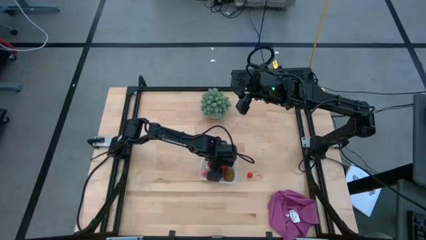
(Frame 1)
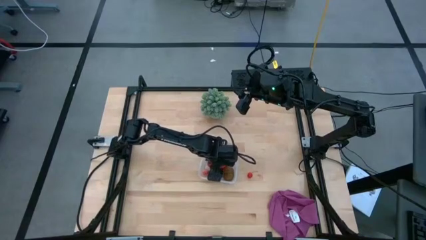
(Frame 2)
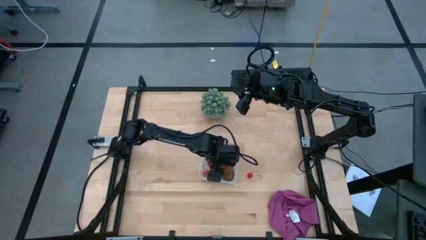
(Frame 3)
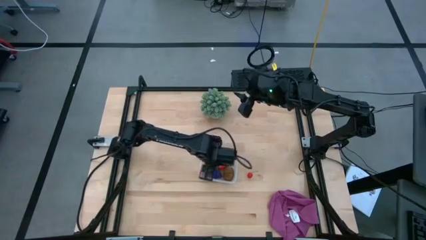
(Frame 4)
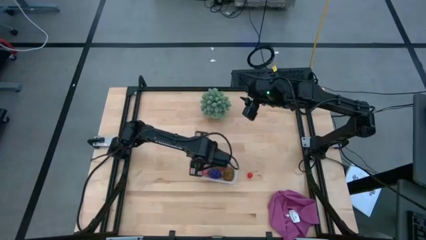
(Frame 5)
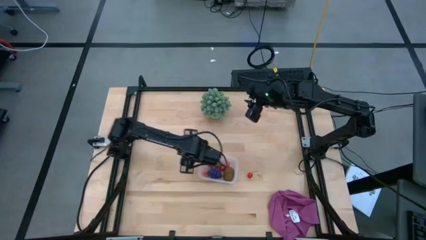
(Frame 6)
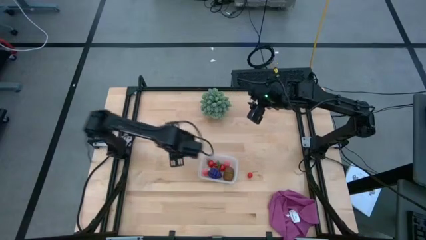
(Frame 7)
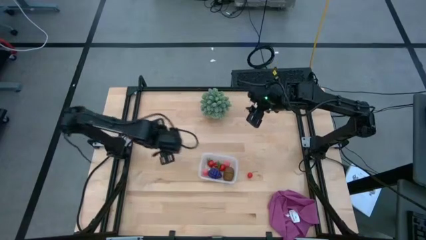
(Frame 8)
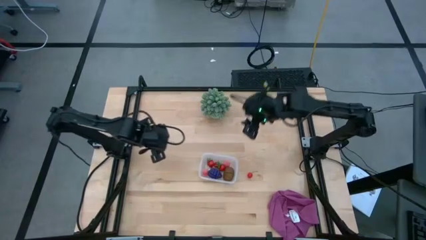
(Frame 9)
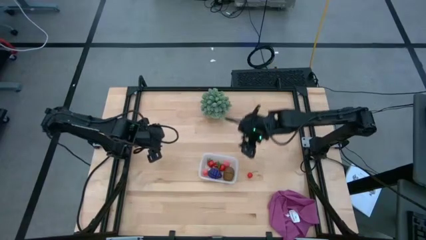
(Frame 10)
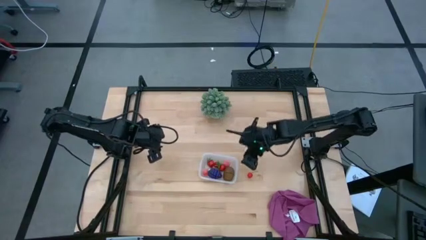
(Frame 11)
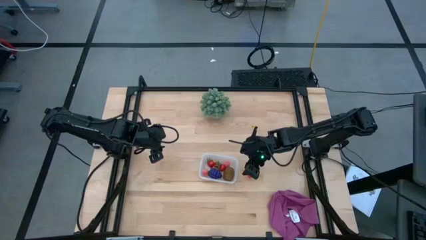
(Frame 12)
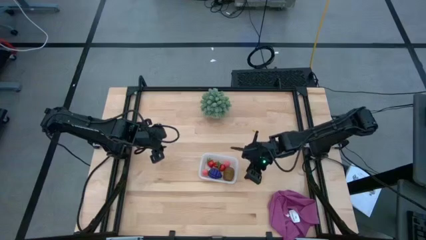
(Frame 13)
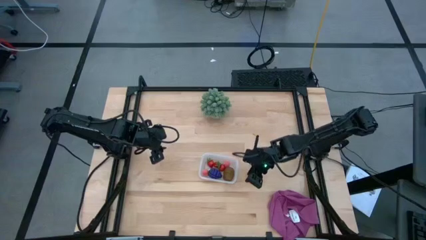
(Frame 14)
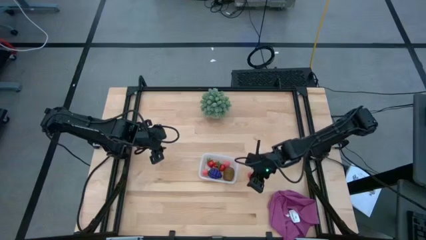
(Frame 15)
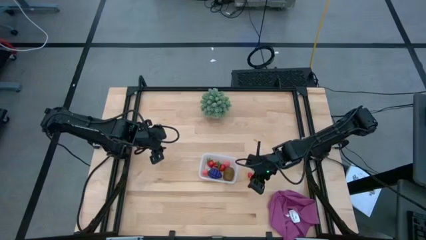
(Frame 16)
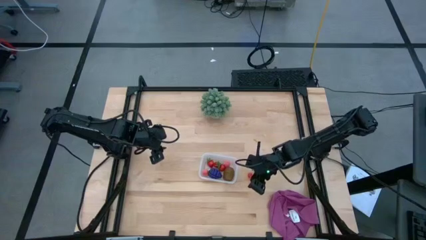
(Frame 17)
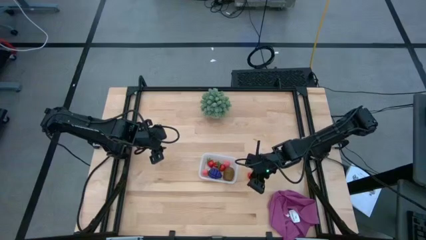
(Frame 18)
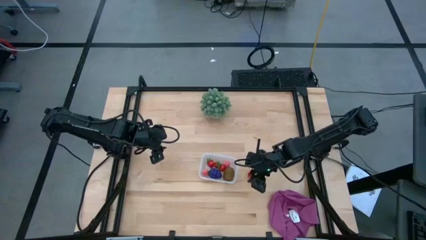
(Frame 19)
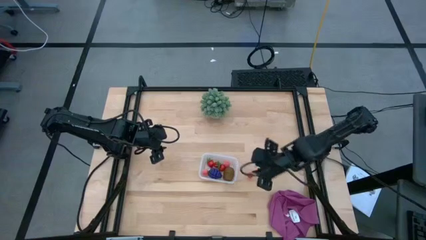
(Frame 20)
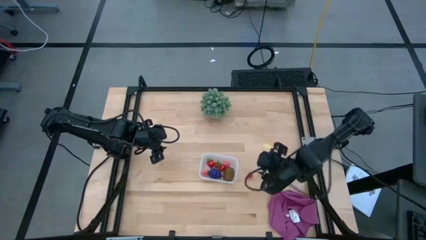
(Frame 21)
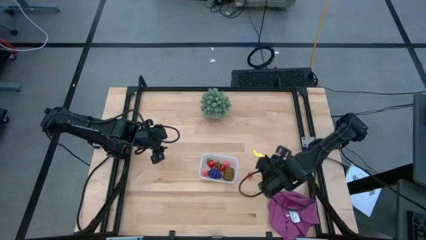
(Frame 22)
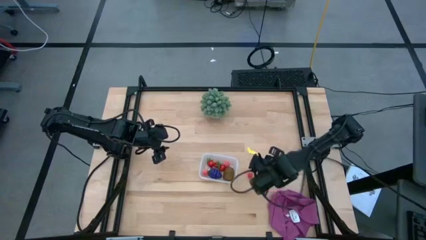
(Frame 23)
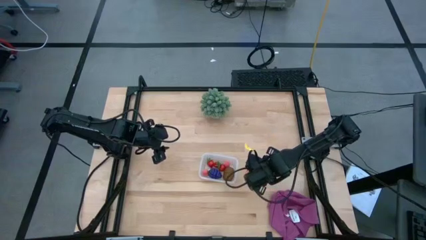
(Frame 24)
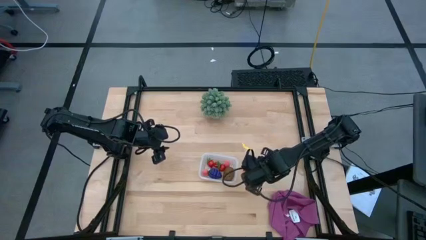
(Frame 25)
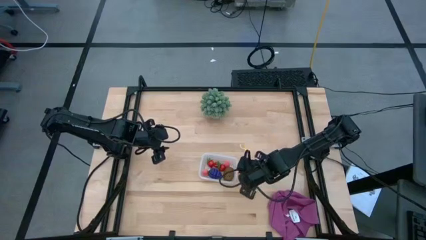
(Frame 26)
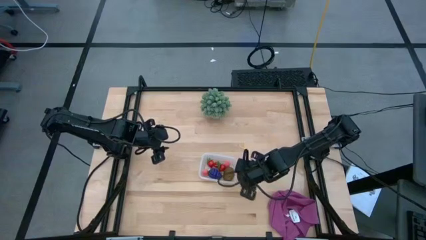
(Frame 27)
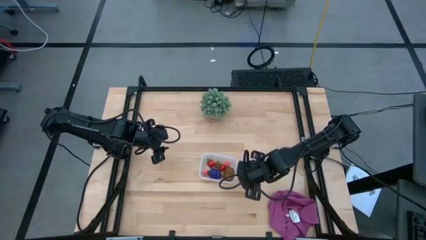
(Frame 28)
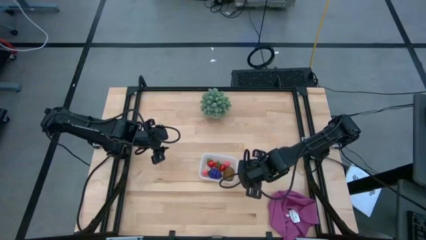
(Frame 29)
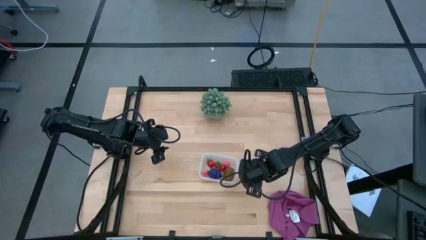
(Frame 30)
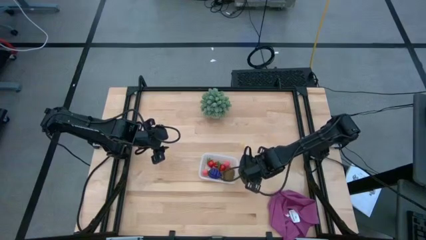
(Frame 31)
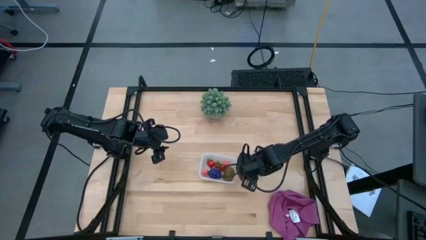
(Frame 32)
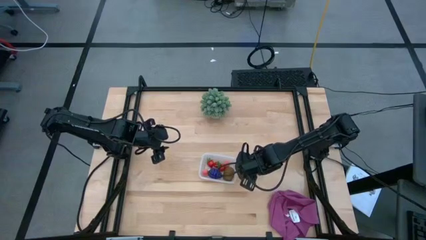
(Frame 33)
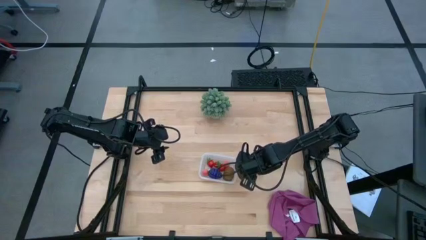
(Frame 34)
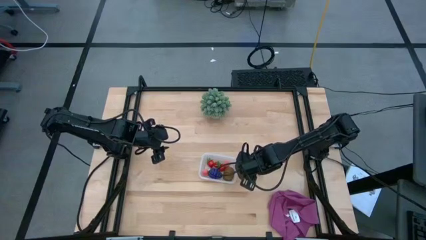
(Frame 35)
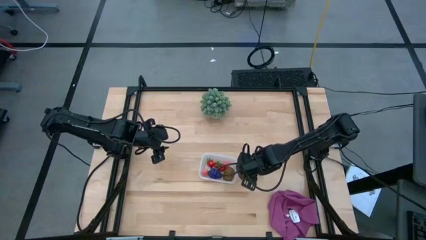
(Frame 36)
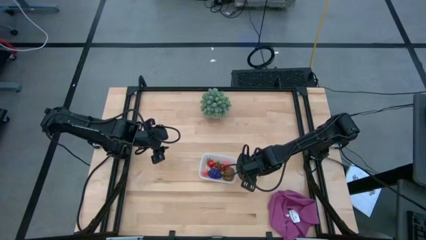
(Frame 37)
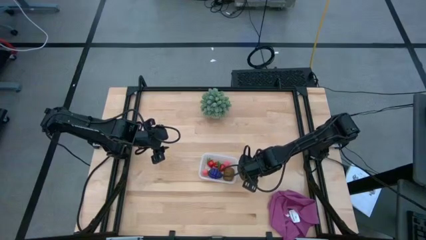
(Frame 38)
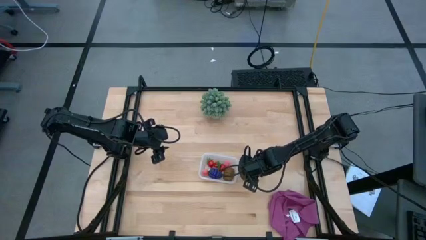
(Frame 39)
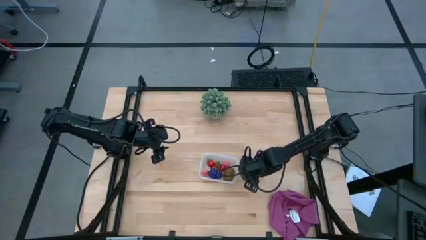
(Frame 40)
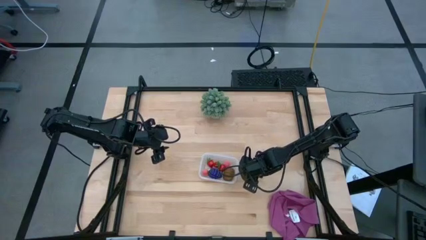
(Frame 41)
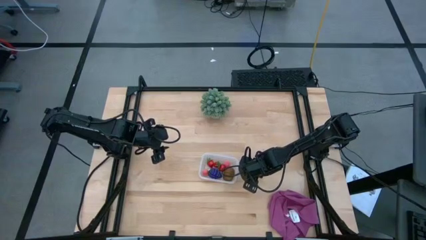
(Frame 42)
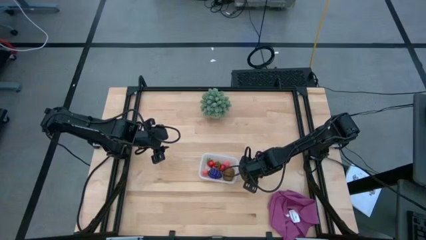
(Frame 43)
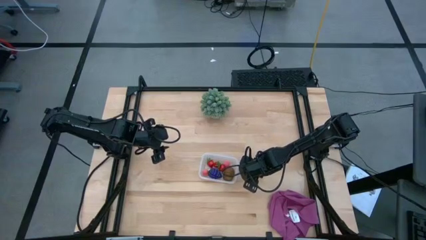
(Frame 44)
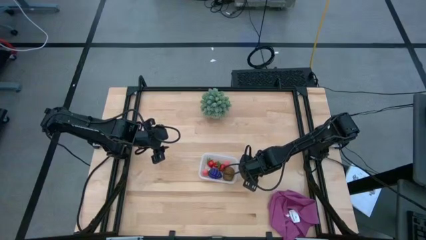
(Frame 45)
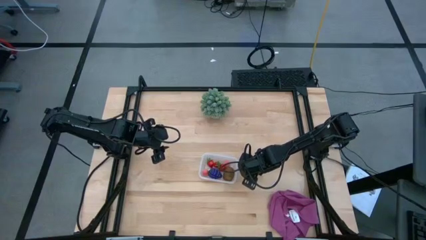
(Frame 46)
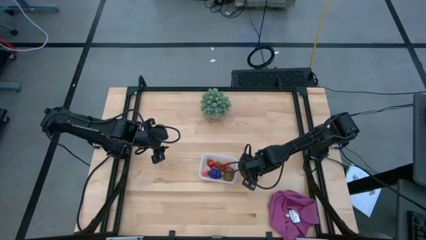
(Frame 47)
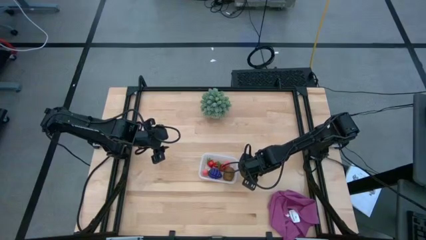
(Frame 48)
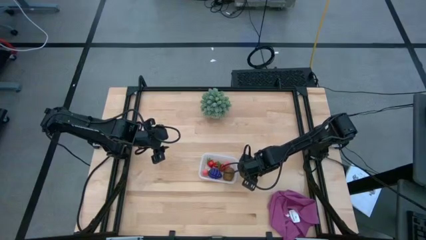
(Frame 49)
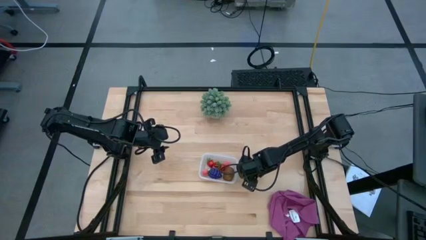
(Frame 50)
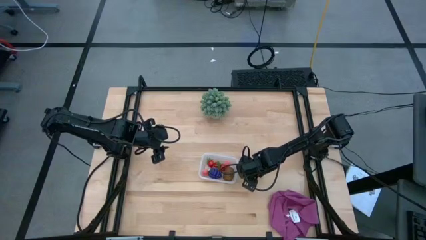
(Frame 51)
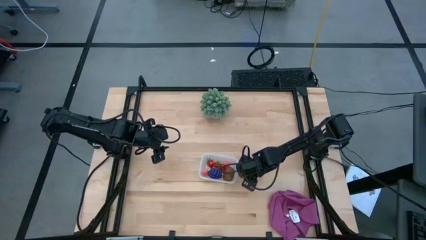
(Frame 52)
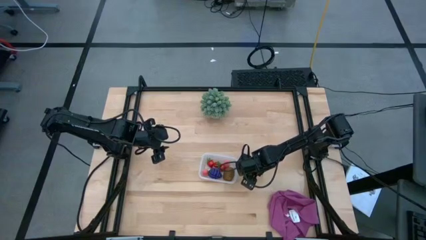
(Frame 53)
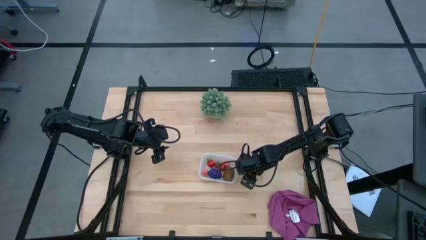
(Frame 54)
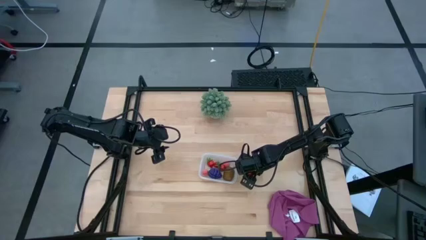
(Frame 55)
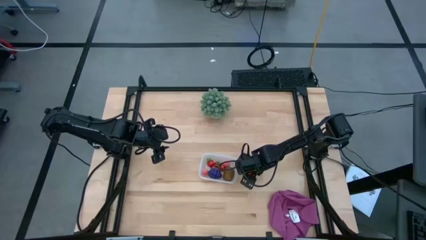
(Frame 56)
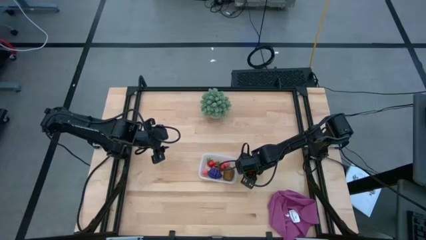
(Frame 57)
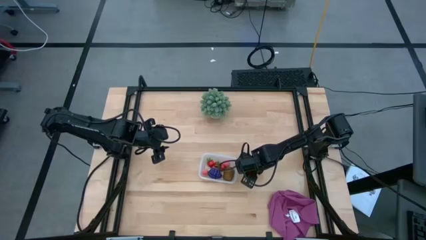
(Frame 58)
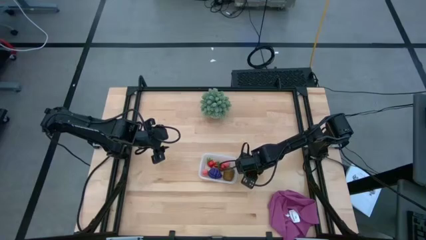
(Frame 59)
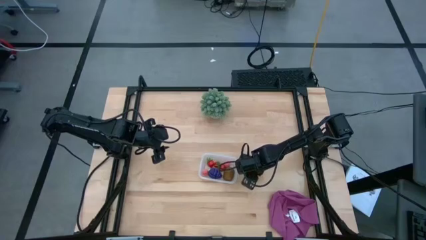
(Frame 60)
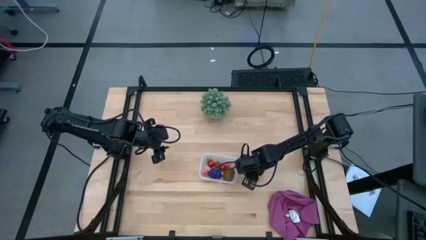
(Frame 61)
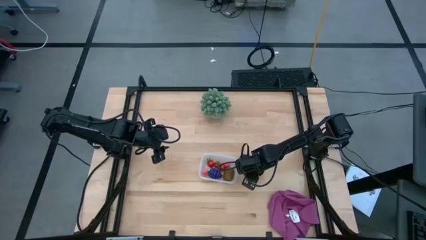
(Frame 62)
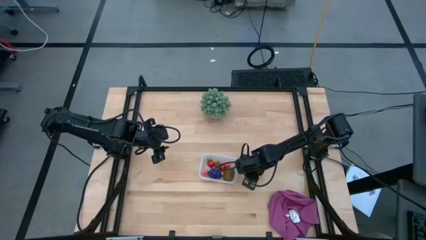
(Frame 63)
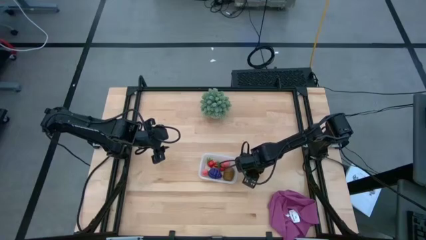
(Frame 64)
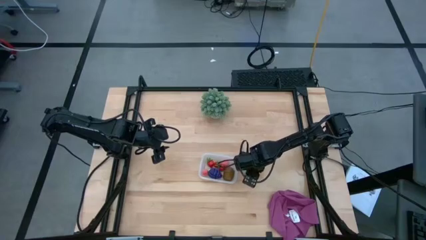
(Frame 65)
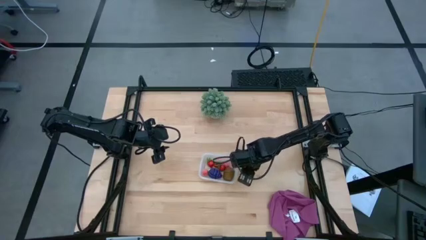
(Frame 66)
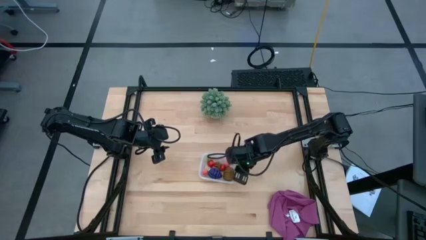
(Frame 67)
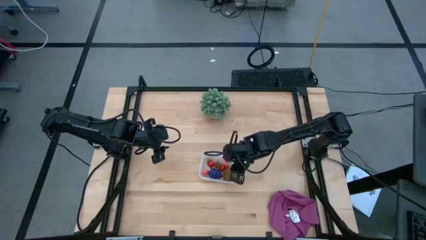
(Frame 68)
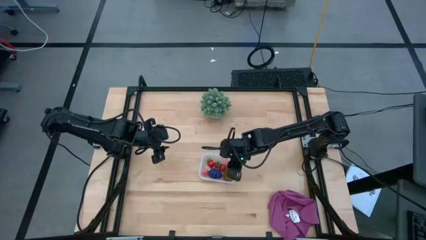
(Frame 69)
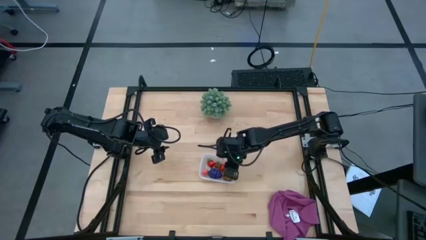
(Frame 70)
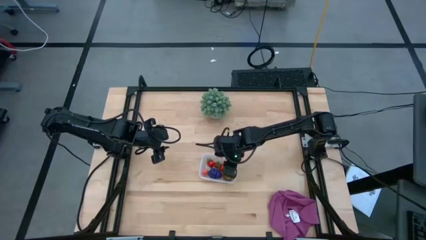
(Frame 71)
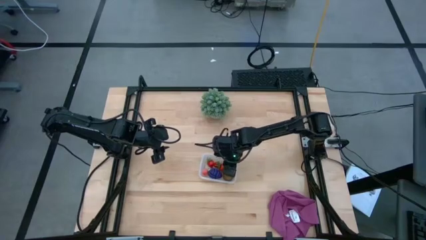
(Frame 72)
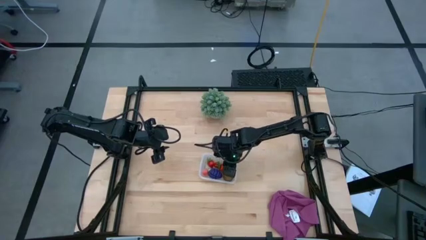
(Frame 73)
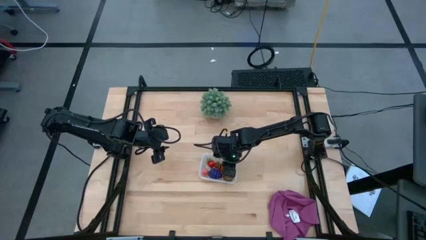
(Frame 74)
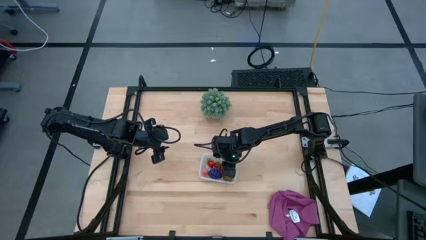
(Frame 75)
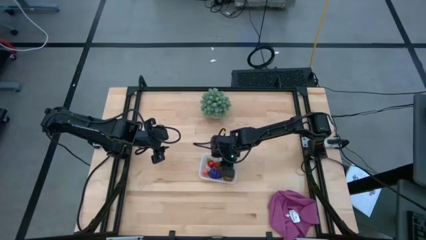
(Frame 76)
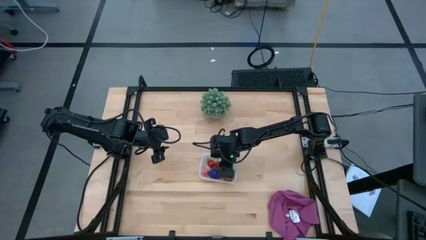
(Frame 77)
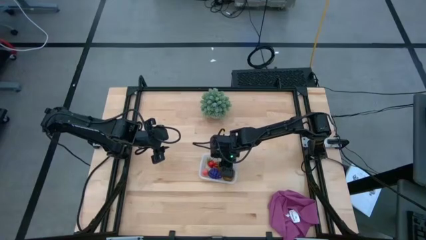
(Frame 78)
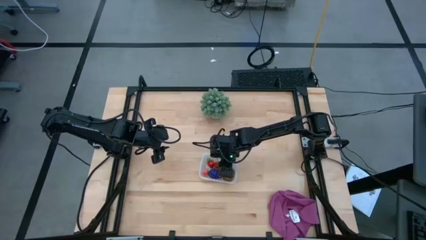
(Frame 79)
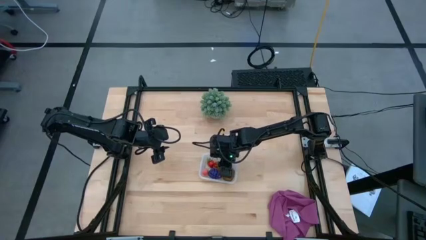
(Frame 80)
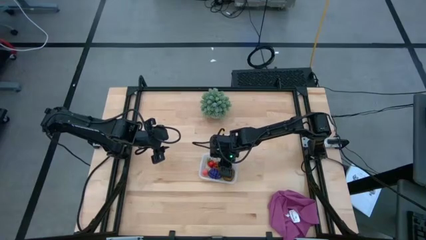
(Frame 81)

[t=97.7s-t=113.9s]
Task: Pick and placing Produce into tupperware
Put the red cherry into the bin

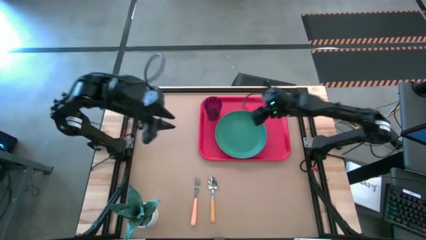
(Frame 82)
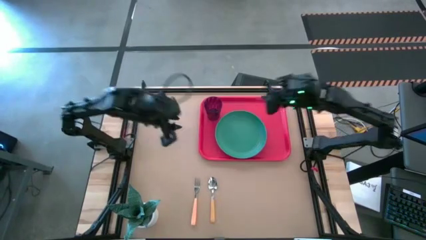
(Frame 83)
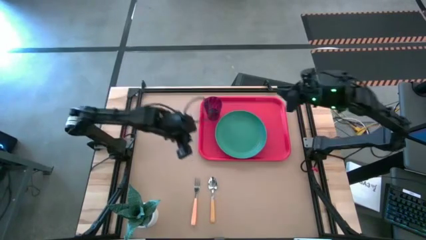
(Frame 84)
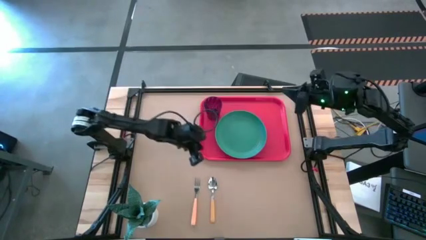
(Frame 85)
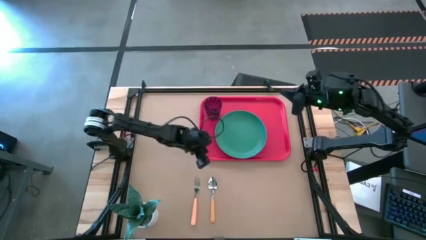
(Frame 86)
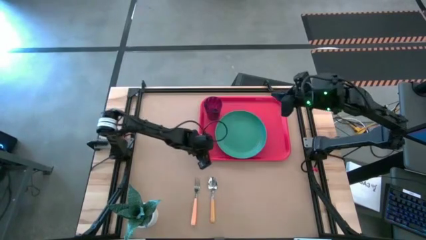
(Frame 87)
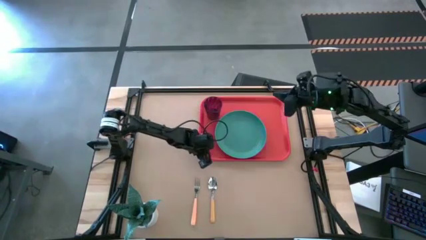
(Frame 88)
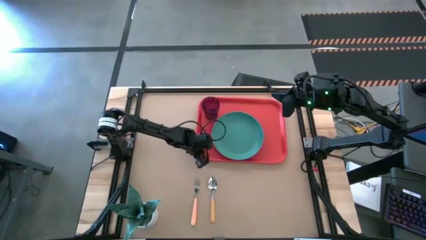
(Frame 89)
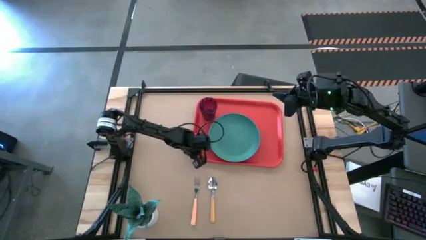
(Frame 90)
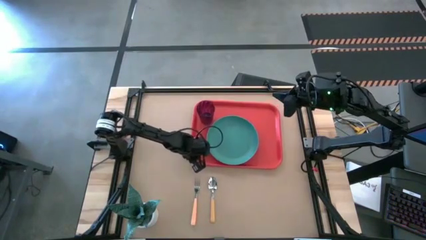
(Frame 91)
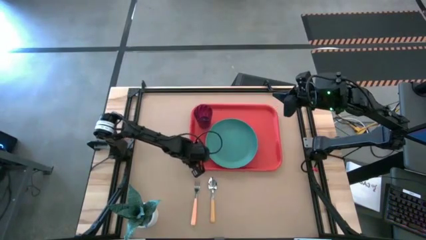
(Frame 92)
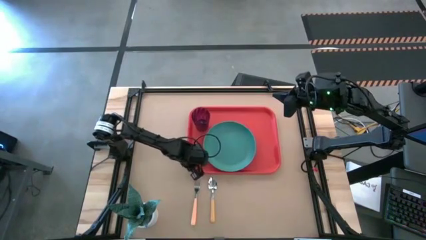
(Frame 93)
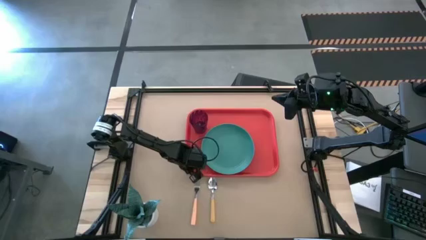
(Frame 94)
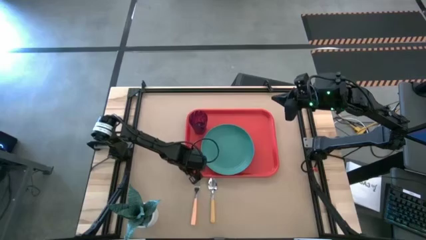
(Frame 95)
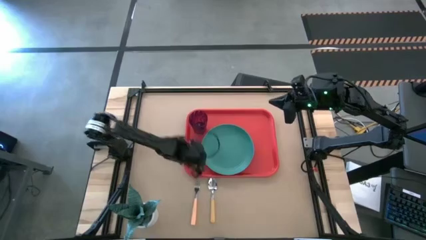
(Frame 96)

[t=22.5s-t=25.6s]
Task: Pick and place plate/cup/fork/spoon on tray
Move the red tray to the center of the table
